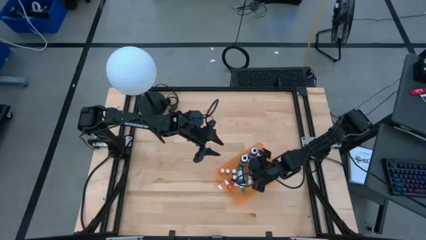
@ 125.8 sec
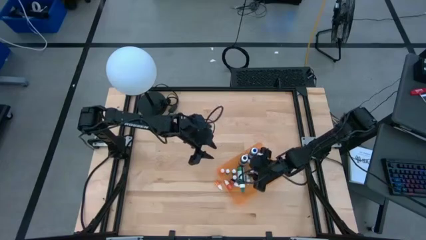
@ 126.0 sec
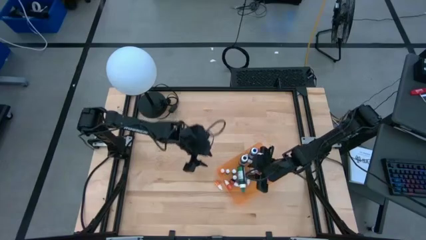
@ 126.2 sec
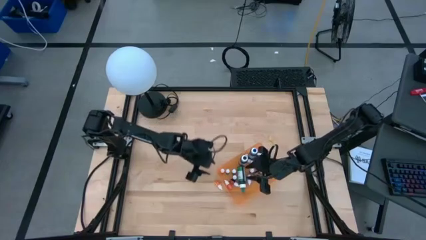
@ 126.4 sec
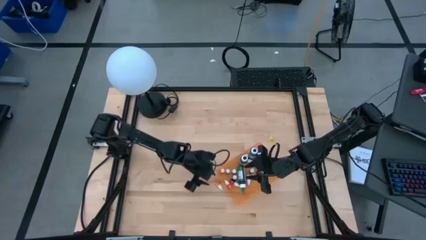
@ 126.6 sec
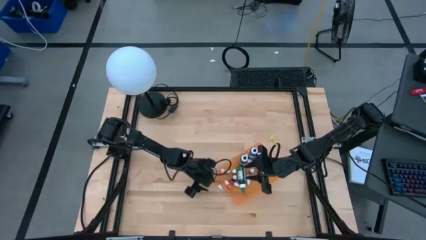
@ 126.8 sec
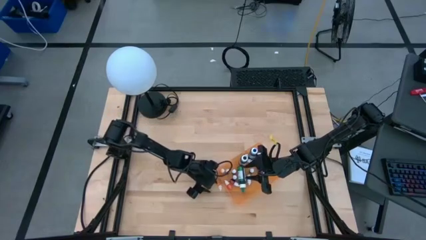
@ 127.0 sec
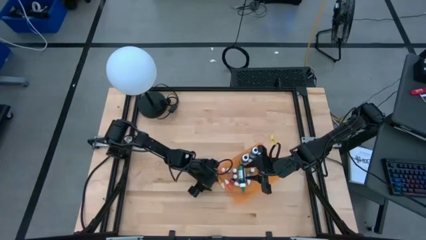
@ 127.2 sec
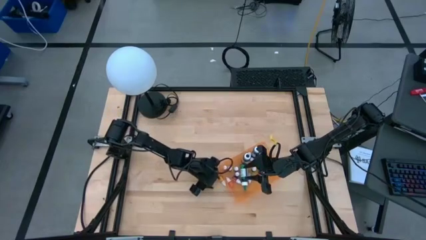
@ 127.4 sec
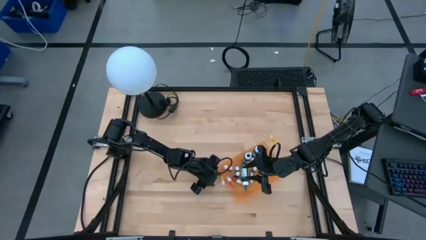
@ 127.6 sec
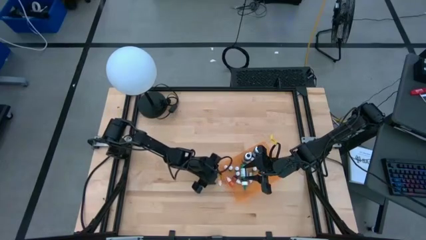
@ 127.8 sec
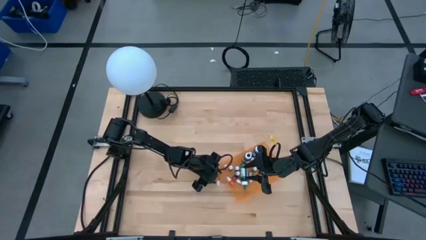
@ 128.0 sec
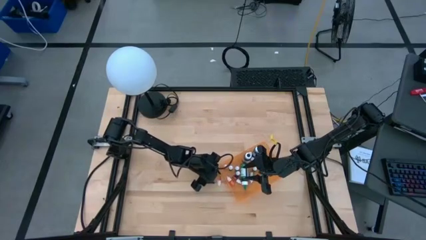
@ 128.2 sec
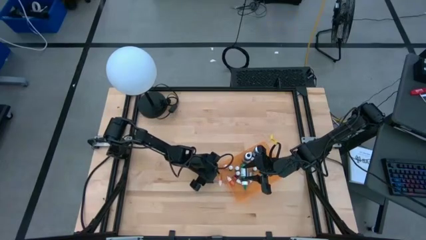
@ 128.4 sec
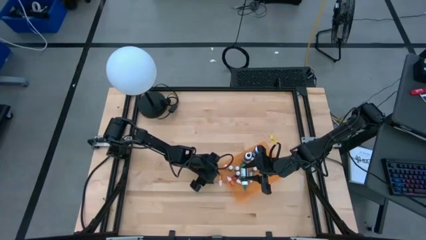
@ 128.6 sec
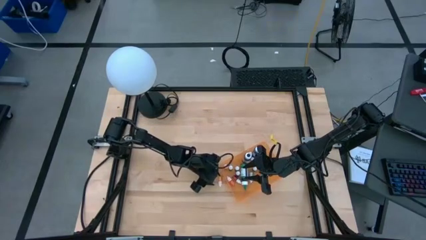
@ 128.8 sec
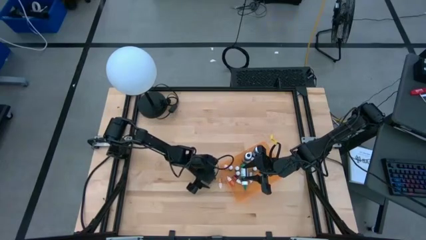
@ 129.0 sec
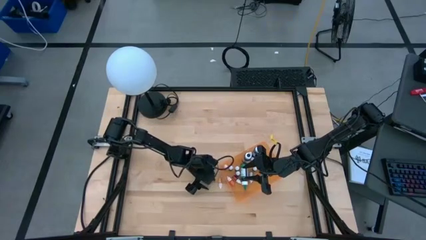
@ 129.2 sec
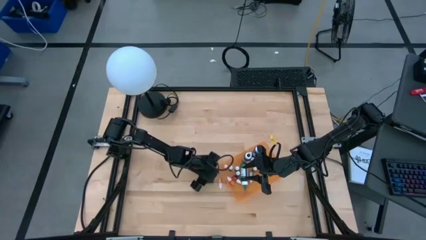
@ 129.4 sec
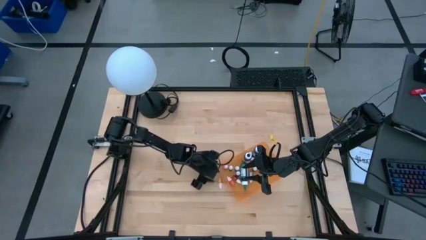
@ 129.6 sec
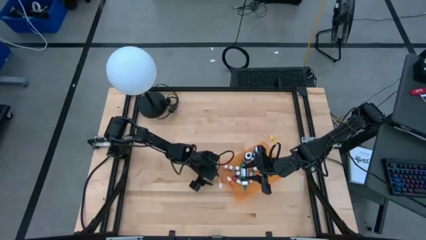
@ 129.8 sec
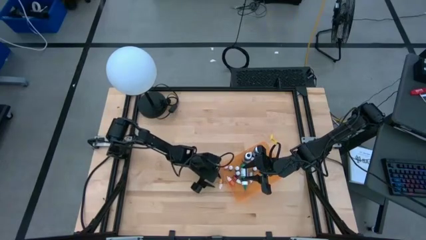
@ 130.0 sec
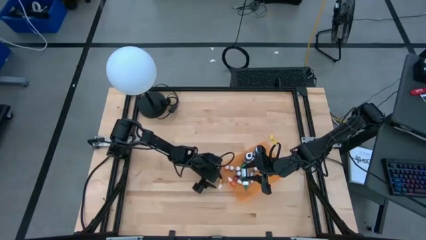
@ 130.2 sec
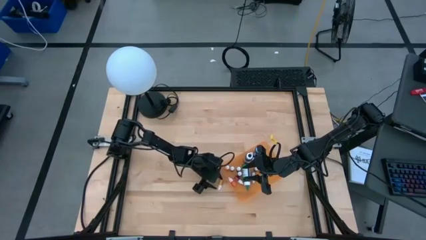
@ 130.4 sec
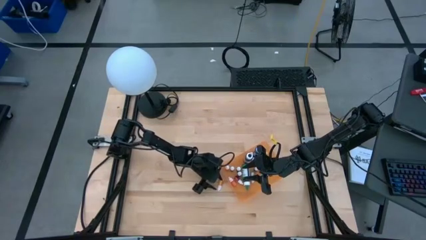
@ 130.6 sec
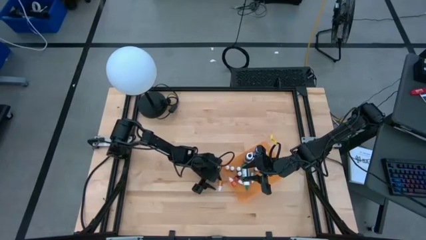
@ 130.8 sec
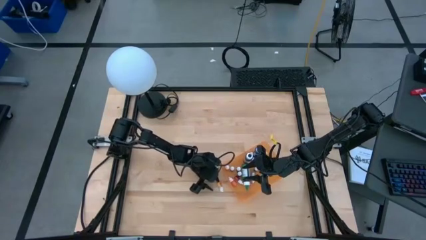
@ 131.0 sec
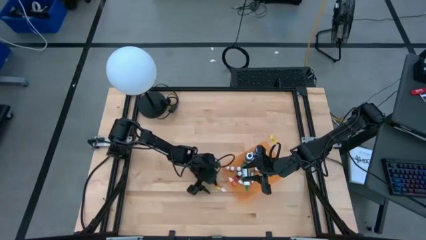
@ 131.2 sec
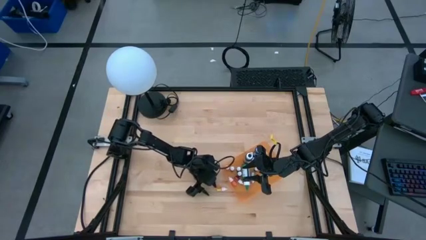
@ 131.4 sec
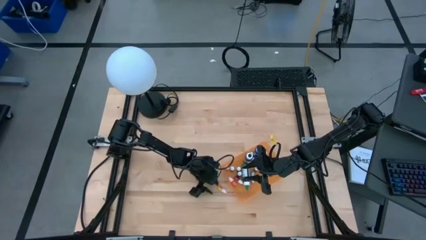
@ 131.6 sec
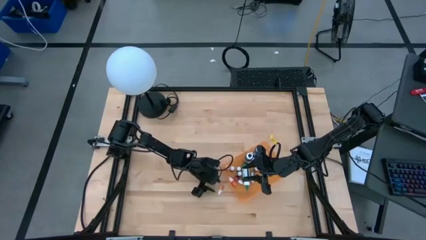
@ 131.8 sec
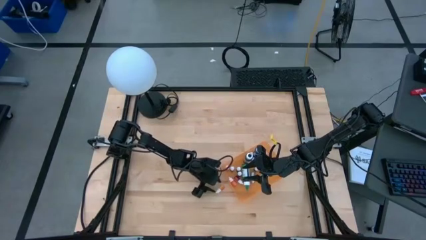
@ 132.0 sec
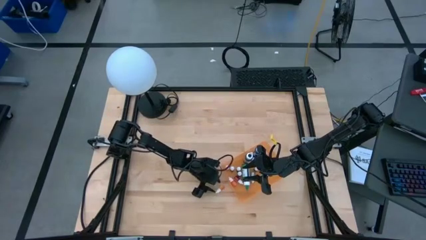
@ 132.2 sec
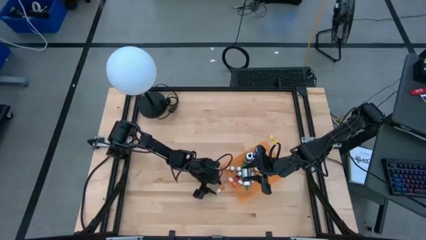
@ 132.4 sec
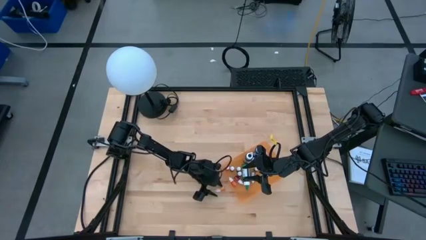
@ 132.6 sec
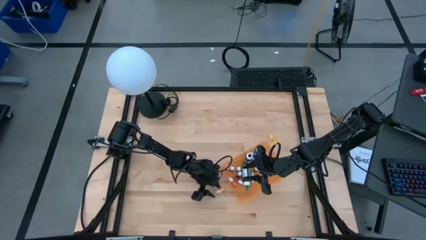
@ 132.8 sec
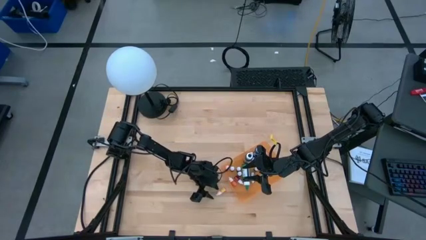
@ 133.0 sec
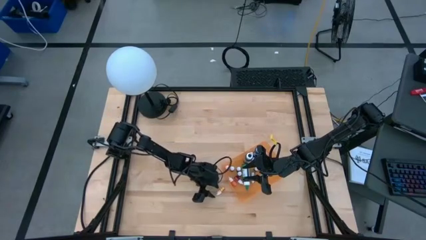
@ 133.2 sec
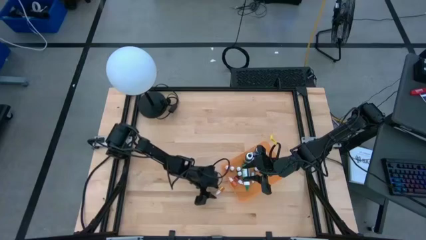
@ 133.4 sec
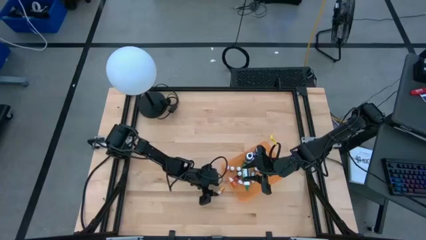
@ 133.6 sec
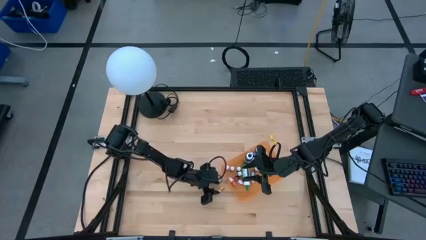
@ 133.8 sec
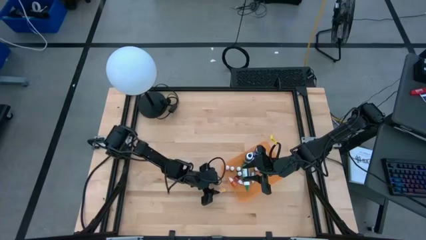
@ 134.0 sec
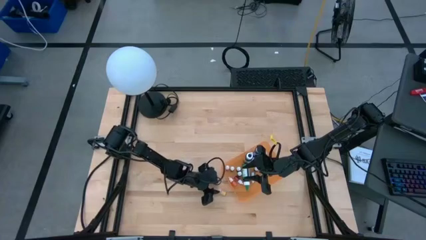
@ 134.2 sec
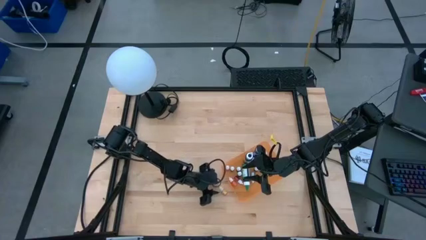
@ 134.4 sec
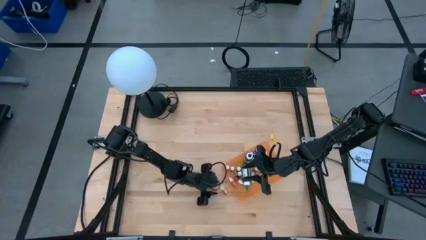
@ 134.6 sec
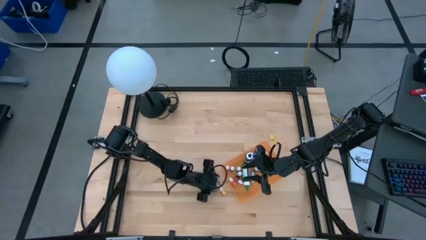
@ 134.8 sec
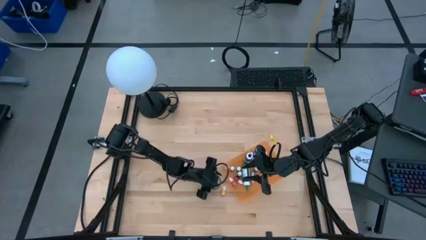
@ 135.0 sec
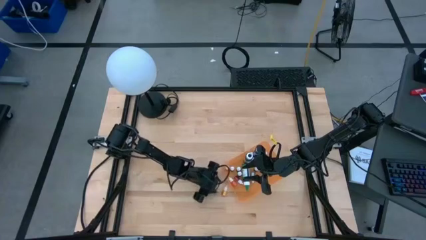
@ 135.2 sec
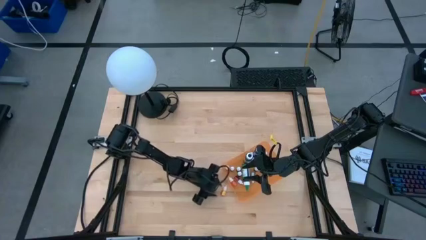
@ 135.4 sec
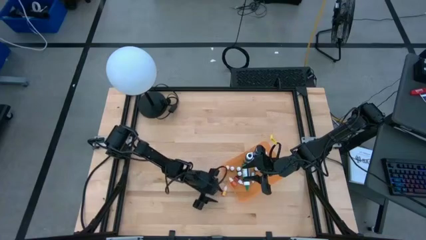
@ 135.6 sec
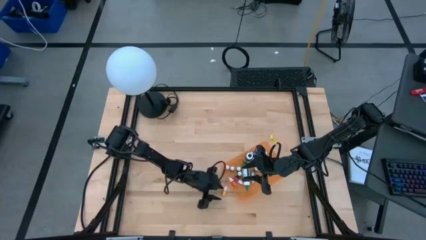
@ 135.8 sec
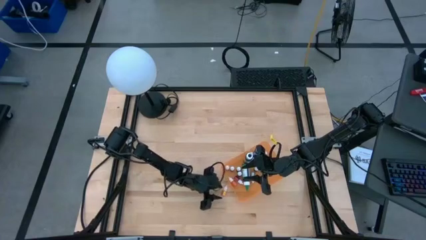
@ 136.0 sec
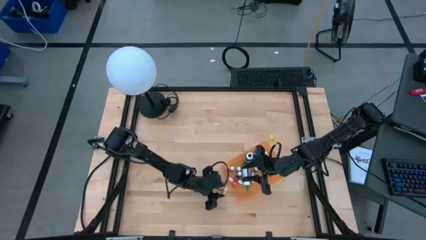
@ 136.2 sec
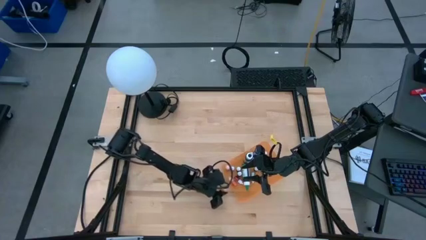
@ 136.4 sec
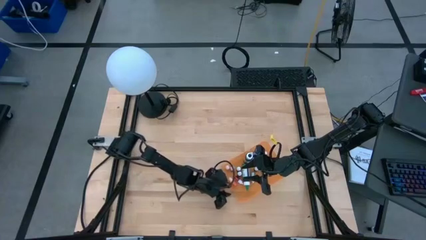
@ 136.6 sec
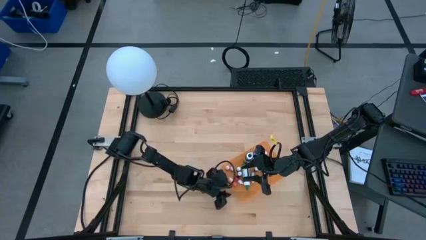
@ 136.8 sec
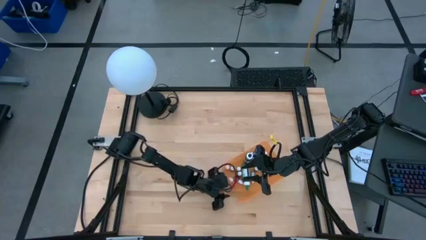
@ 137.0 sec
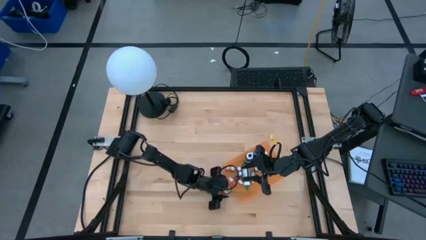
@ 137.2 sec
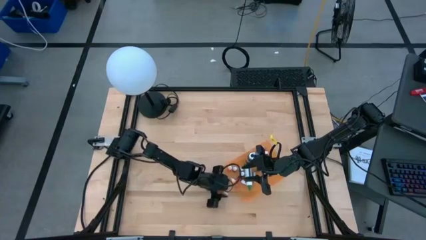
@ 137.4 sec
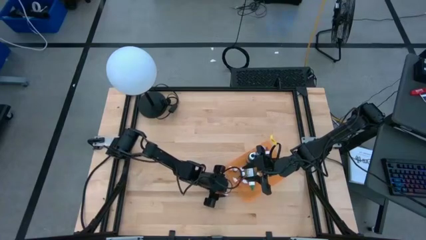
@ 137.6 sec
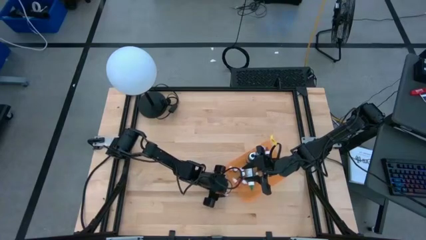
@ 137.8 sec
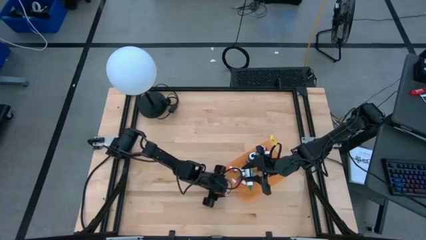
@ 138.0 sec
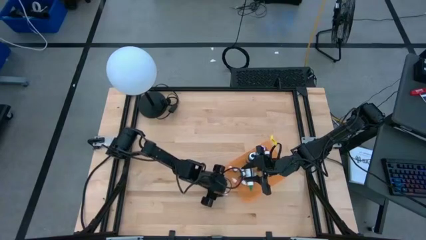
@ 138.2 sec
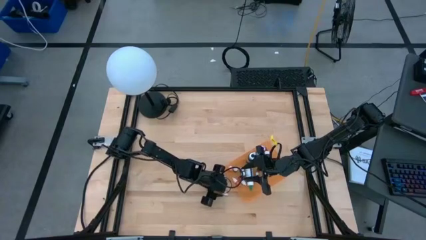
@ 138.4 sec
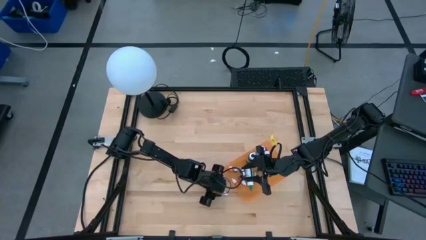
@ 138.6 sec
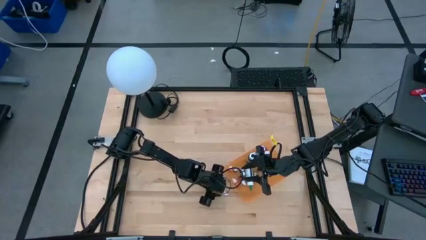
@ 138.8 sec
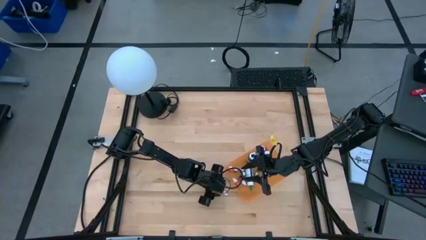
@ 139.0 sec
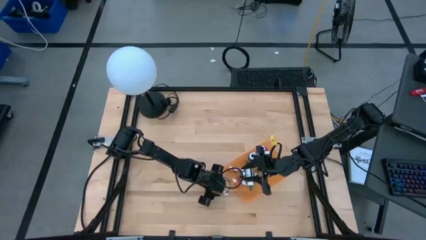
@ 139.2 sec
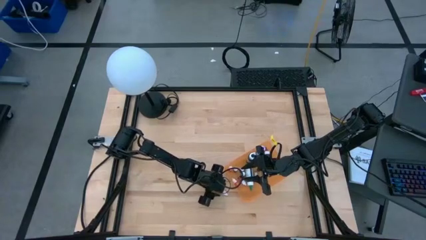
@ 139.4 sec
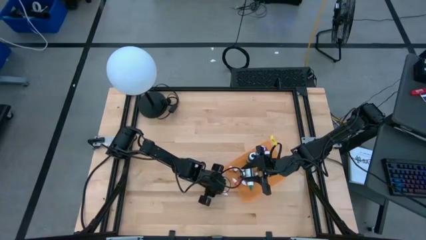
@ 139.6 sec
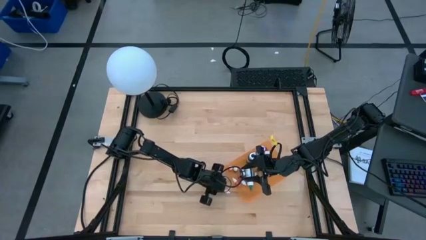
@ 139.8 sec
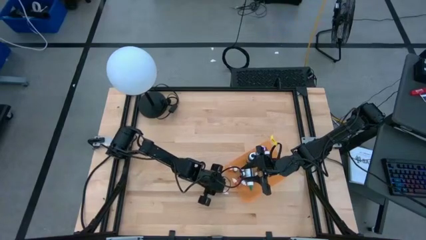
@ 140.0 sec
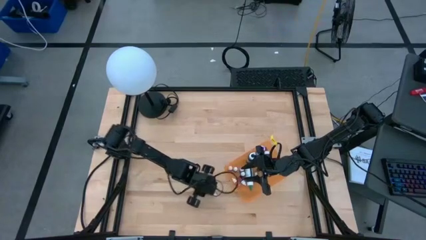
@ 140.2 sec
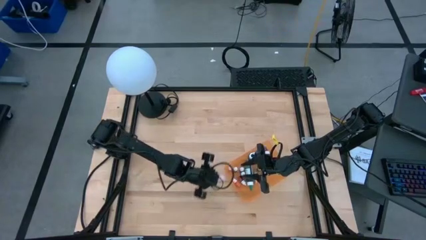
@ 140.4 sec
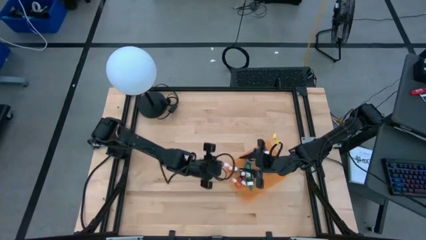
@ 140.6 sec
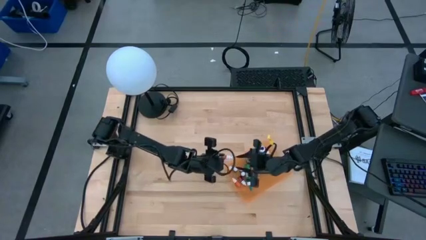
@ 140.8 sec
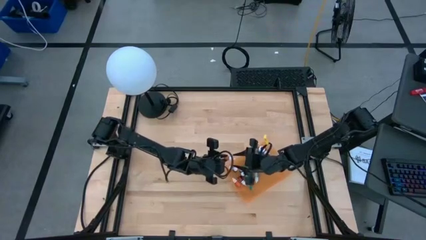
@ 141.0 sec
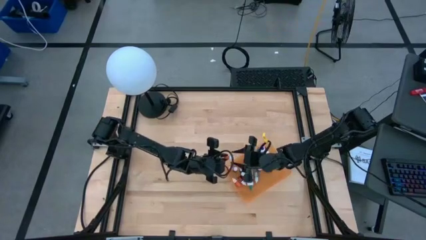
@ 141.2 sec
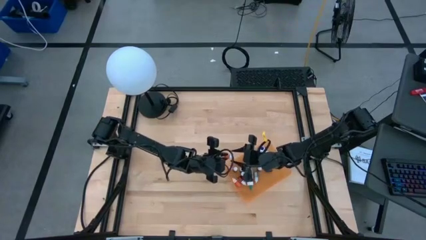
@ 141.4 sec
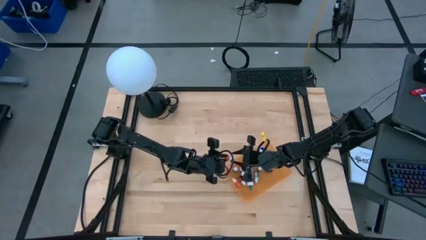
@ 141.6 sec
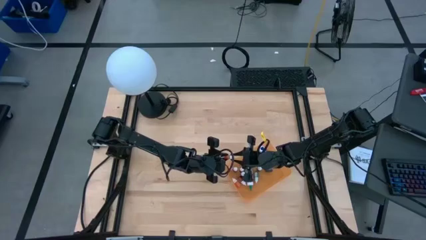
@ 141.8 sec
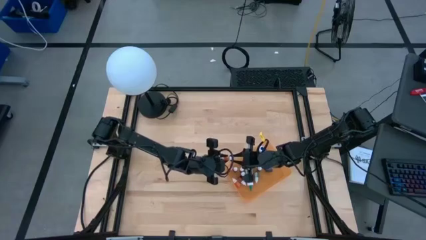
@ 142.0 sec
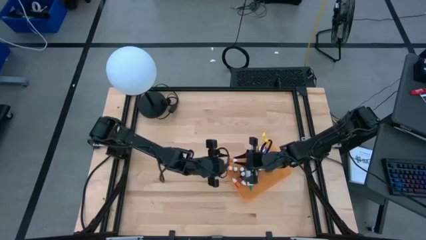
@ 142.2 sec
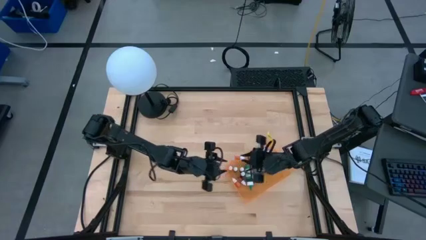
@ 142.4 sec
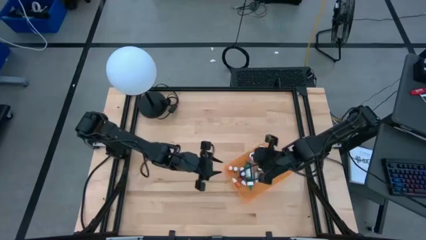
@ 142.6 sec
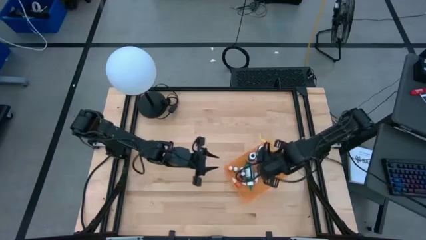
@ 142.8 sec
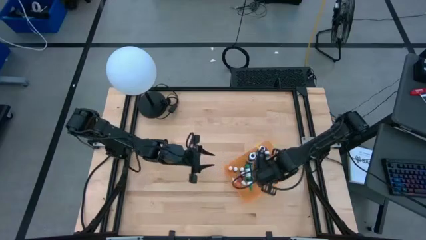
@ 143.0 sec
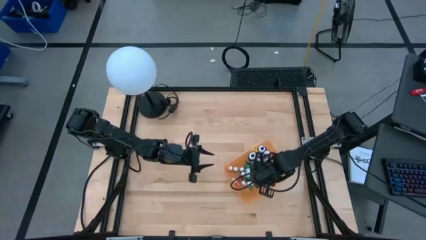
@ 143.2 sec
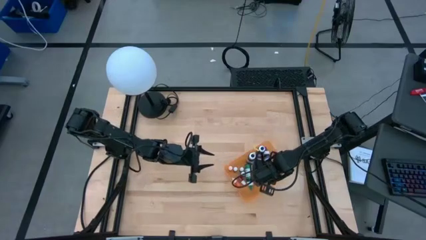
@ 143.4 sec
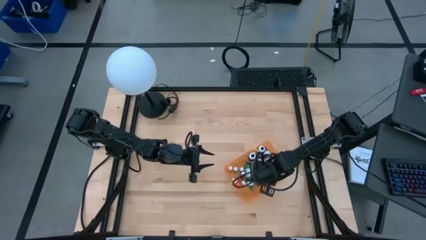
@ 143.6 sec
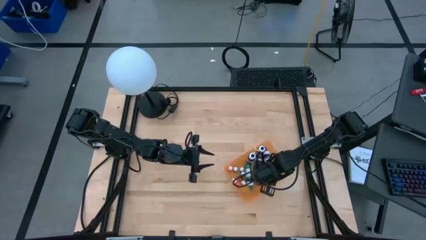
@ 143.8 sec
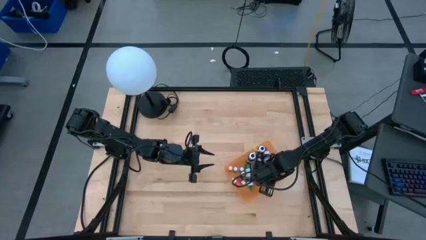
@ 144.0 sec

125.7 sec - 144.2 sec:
Task: Pick & Place food coloring
Put the small yellow food coloring bottle into the orange bin
